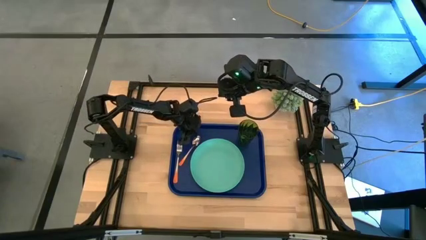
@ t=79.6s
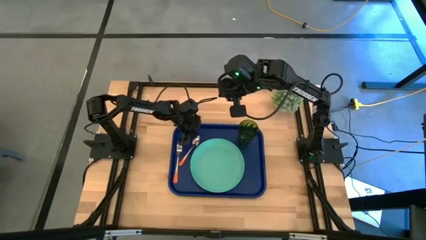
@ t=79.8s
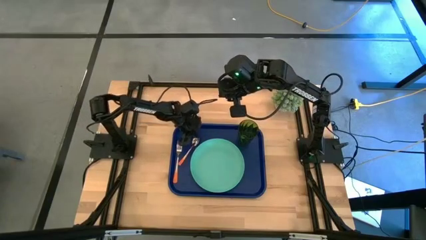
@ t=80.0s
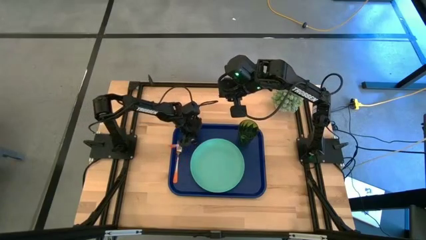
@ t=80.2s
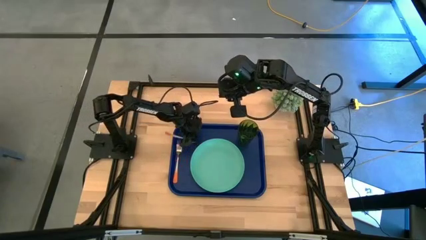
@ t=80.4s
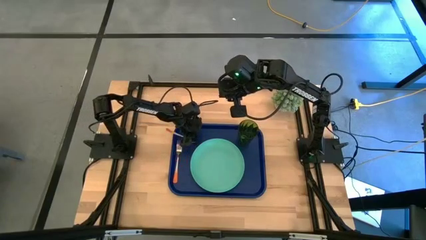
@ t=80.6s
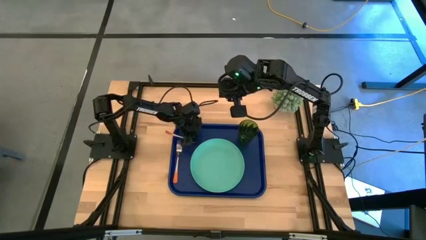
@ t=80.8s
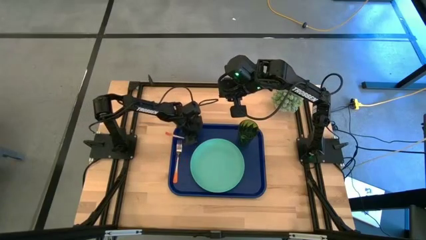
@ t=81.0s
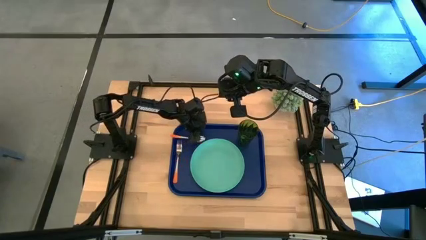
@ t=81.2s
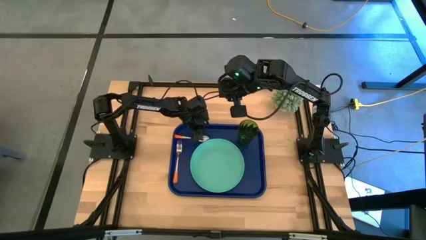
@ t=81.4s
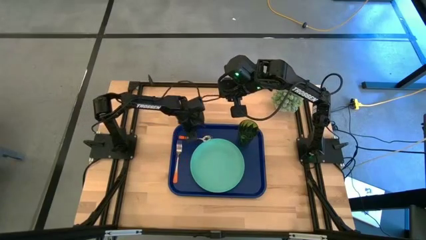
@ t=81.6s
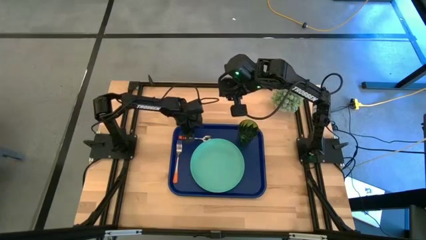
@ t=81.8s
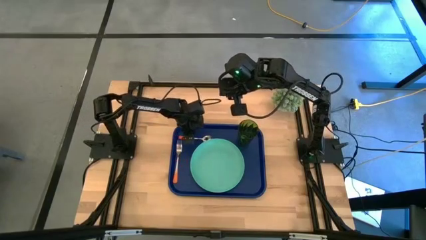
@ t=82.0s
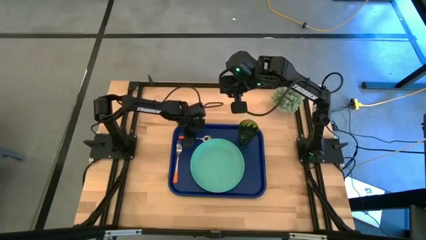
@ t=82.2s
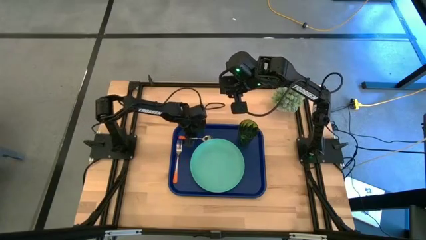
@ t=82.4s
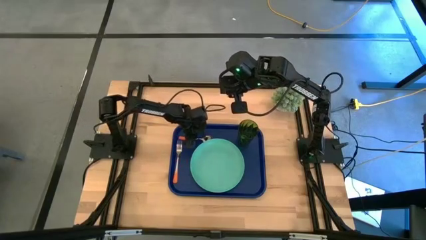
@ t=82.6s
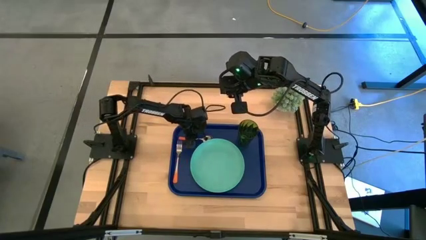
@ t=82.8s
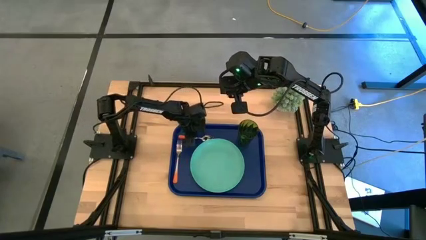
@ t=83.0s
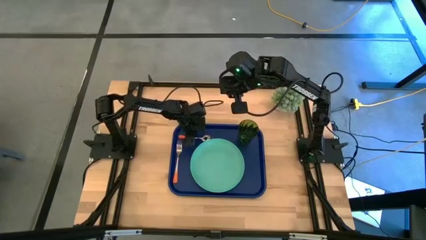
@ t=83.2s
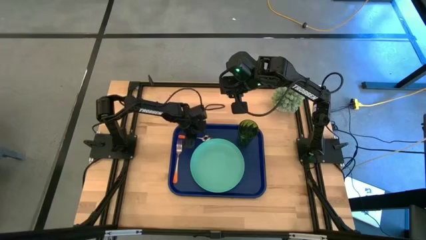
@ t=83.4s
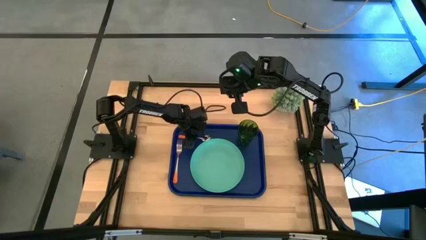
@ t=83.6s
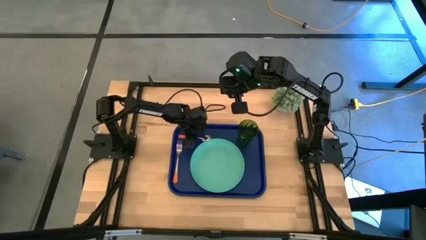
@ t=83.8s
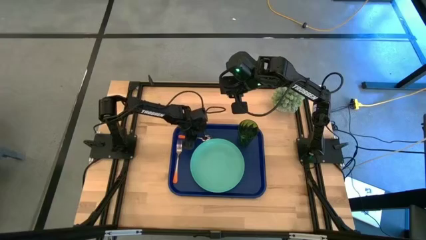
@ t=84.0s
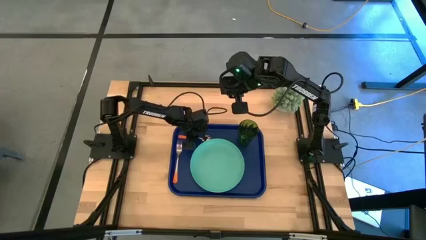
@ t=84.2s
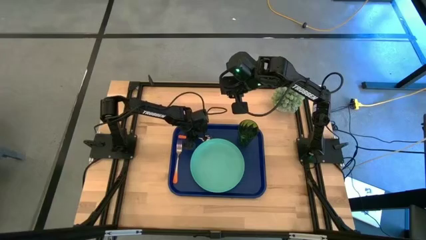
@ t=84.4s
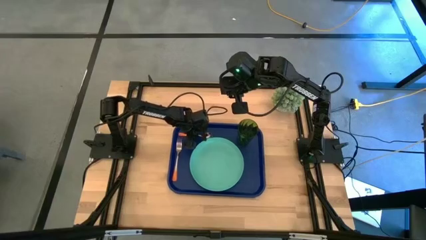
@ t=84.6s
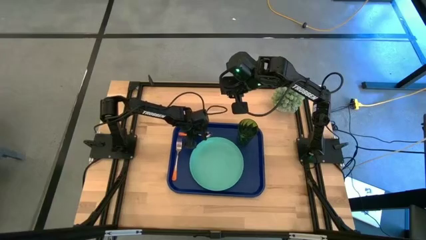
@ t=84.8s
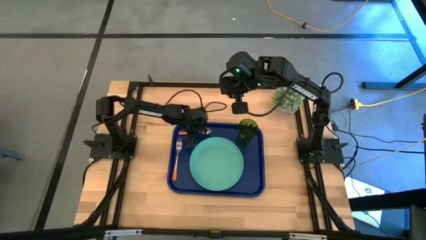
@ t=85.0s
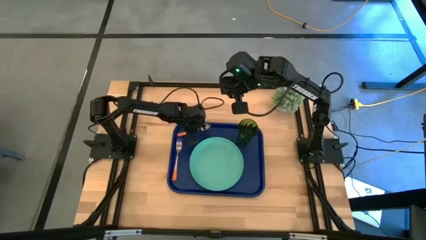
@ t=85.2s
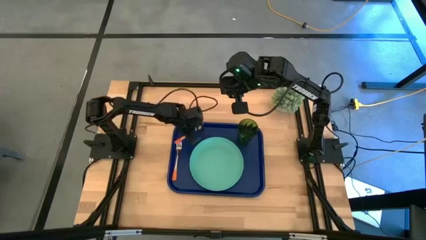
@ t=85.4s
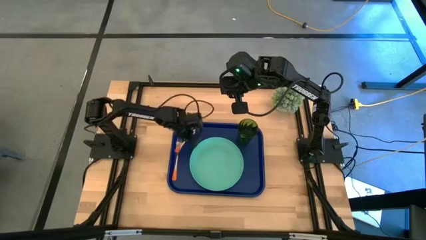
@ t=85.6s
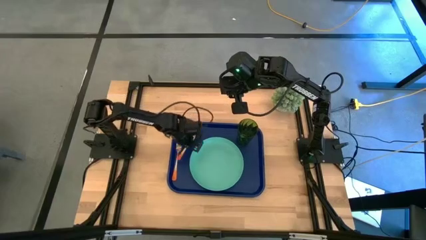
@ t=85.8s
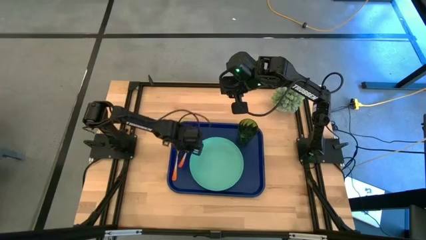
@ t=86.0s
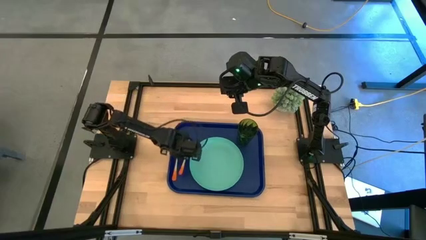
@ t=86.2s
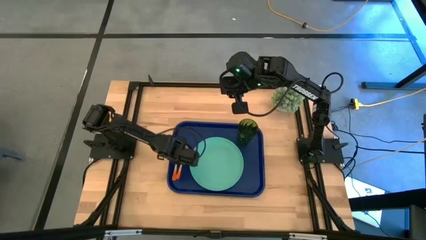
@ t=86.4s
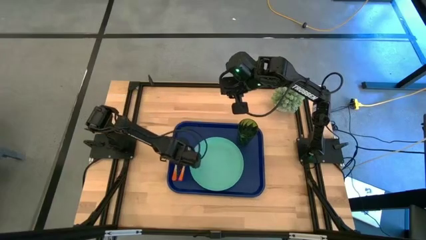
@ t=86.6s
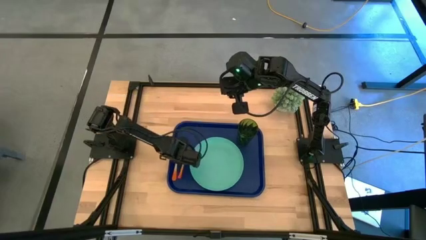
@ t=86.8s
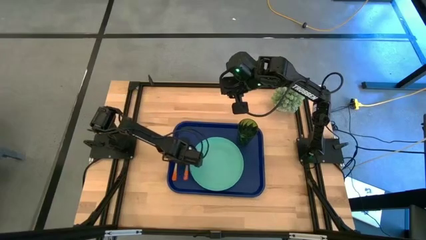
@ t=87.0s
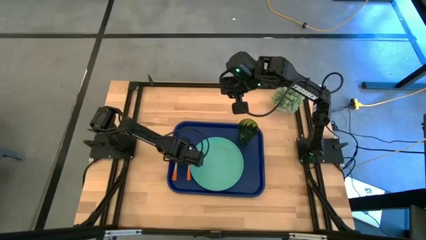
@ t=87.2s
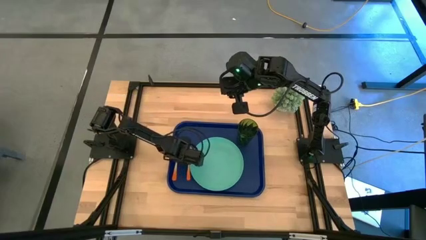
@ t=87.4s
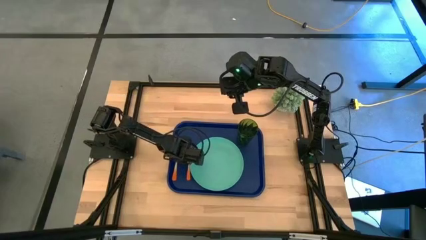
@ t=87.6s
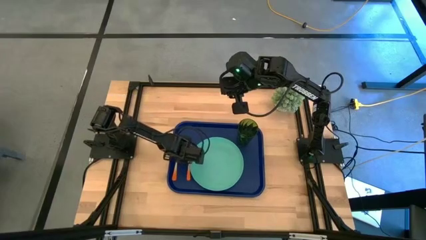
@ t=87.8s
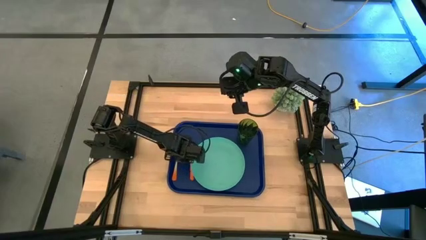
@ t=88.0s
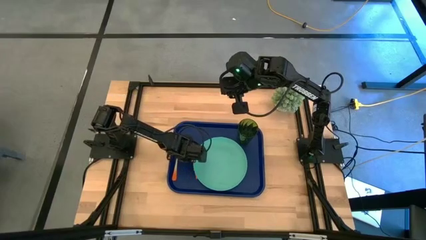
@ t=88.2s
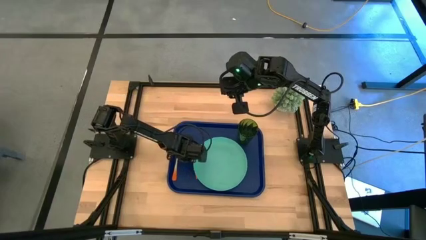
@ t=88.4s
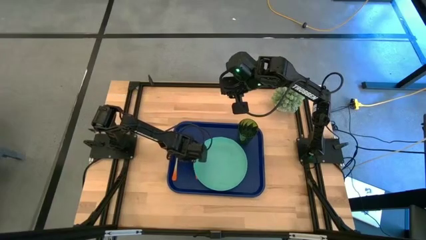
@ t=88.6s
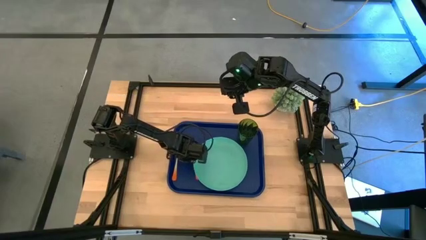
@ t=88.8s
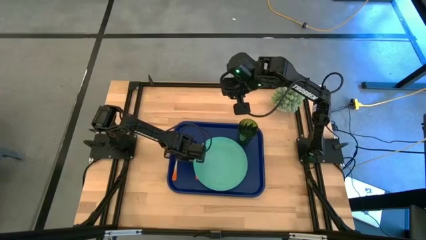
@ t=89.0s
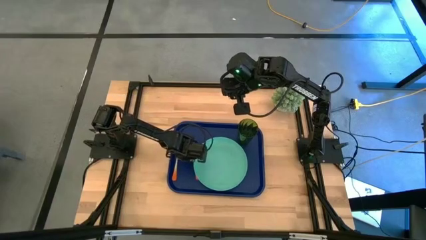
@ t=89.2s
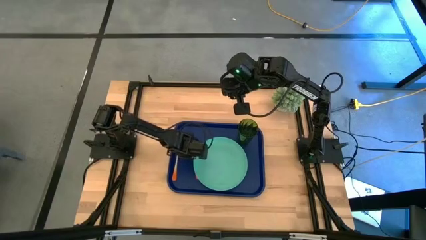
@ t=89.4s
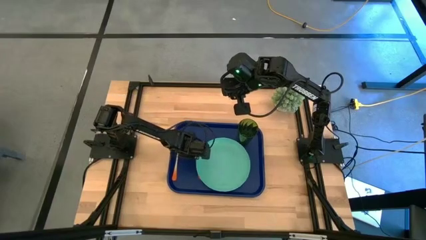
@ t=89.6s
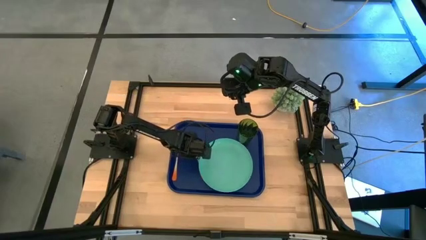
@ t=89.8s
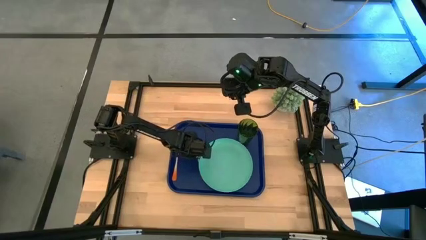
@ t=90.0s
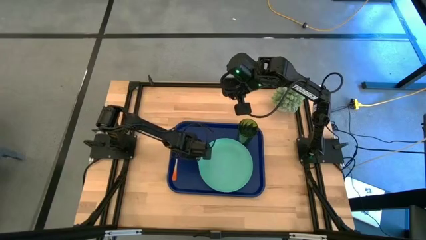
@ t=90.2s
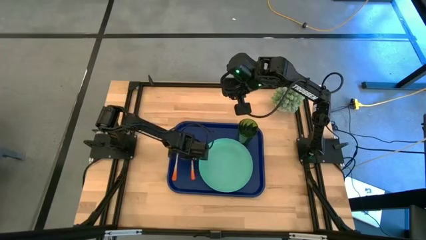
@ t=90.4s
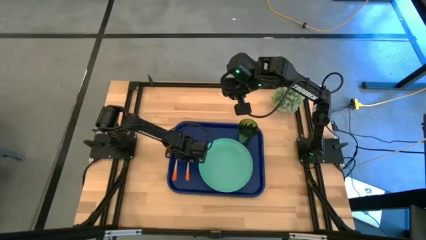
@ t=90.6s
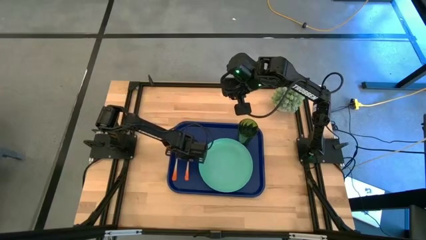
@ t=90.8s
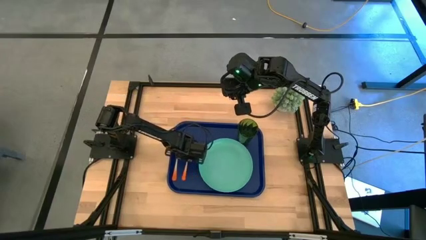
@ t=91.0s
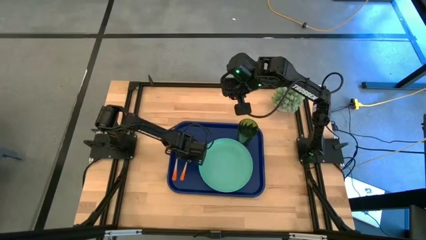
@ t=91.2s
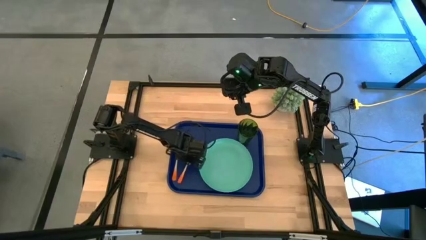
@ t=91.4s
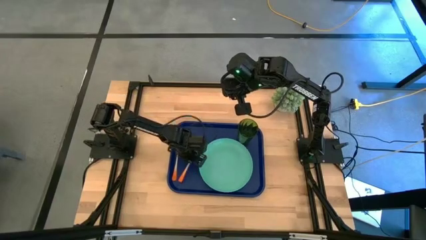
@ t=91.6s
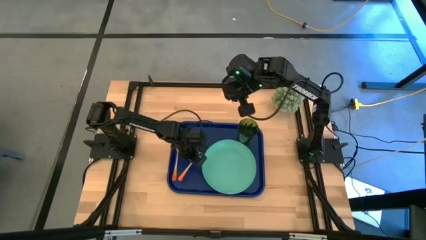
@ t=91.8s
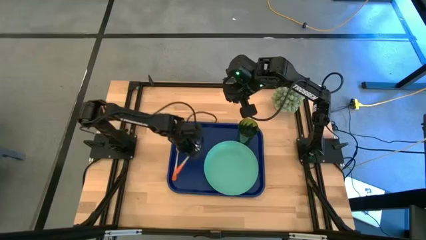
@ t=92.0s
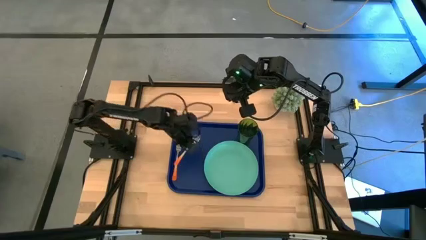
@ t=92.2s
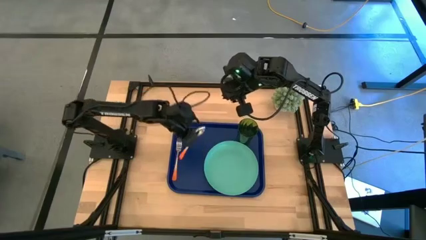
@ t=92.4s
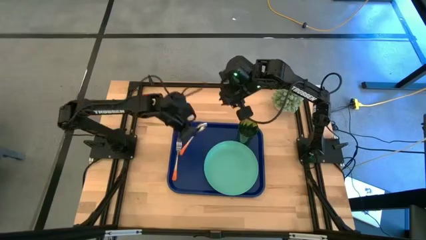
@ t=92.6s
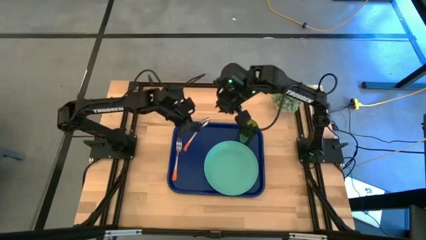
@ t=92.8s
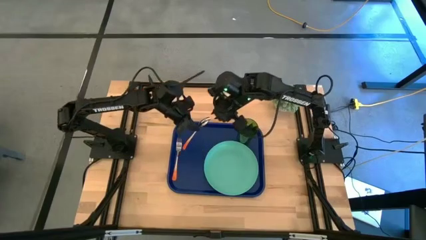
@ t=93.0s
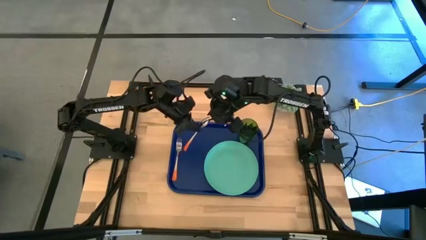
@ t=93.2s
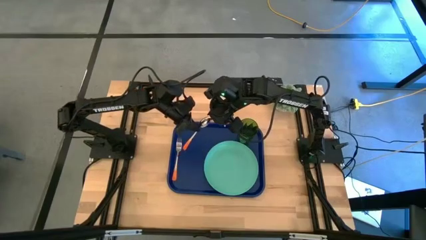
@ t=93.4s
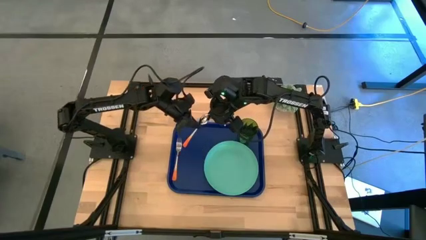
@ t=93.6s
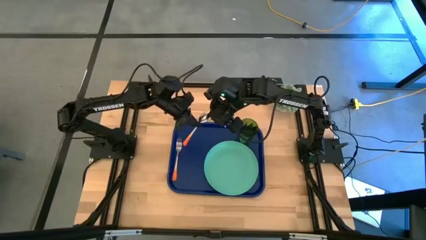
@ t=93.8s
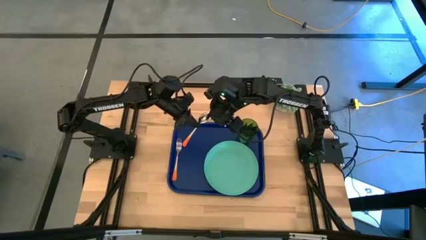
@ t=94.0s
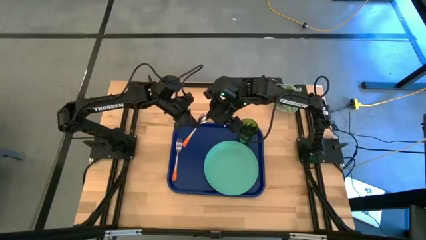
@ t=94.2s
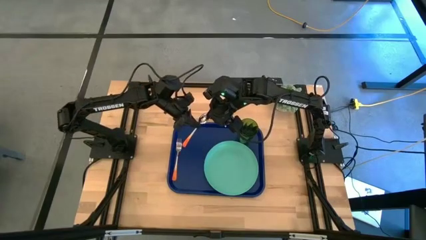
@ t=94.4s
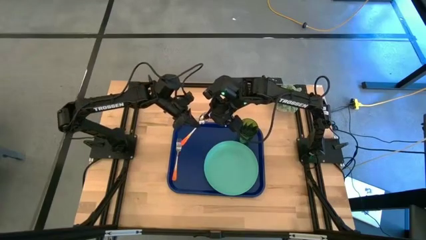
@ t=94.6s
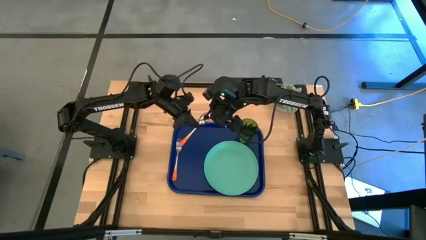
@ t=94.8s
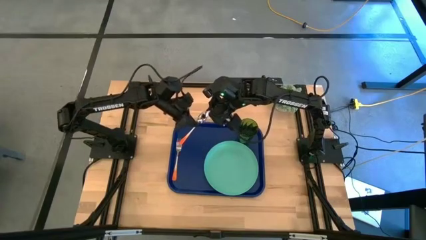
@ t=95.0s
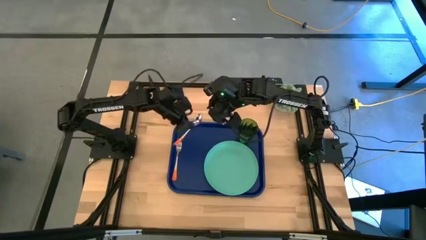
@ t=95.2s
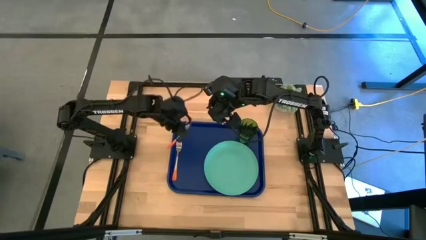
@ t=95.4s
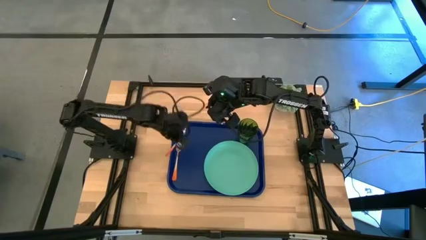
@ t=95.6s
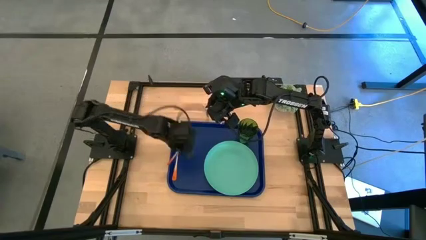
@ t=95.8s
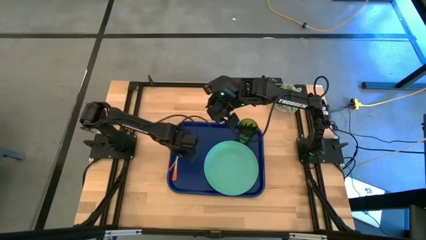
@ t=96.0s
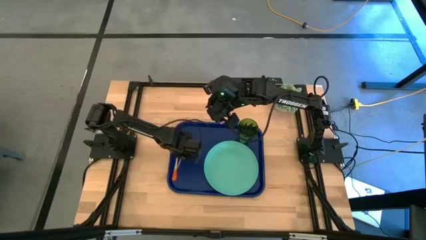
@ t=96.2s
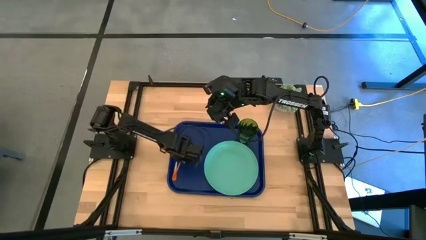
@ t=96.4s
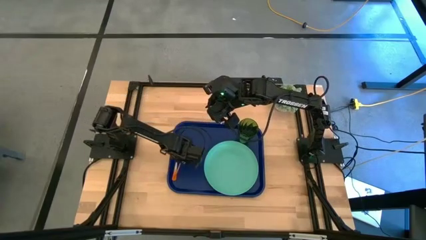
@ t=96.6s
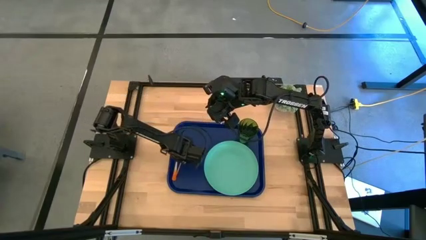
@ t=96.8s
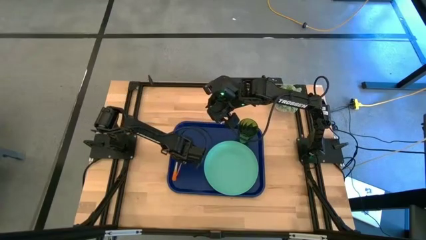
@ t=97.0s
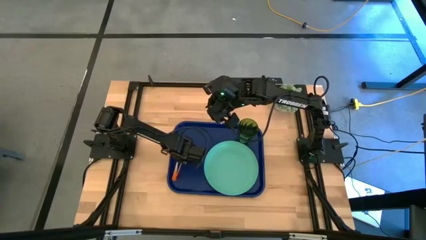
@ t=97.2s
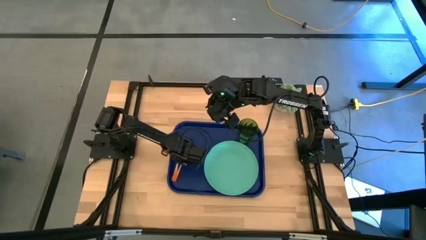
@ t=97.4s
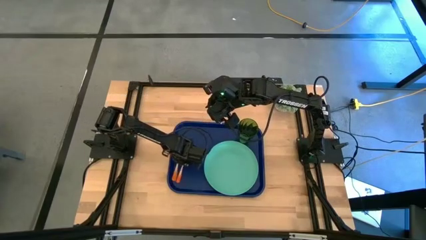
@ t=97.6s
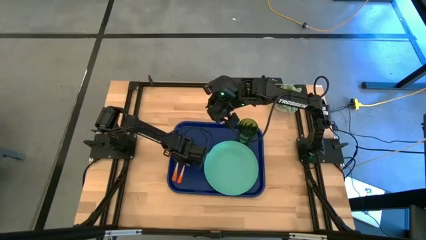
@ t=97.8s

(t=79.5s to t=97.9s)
Task: Pick and place plate/cup/fork/spoon on tray
Put the orange spoon on the left of the green plate on the blue tray
